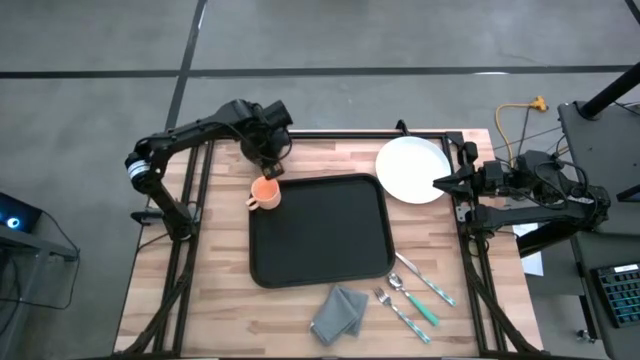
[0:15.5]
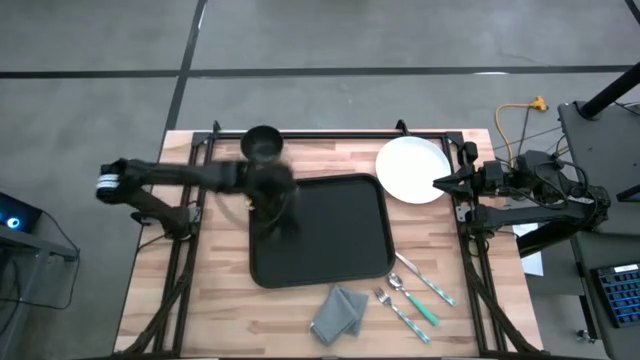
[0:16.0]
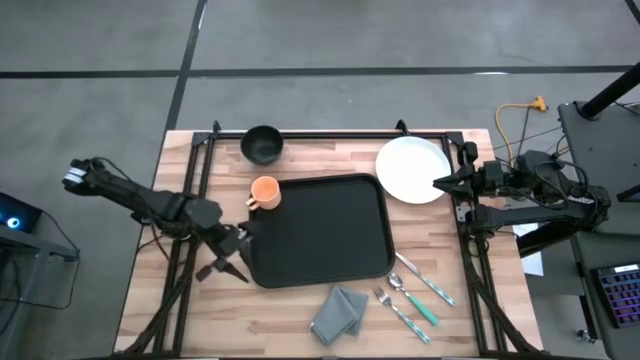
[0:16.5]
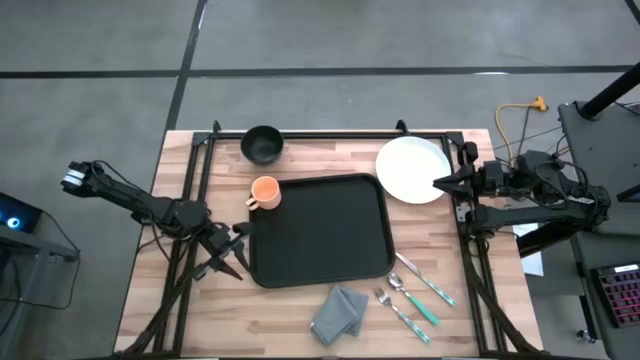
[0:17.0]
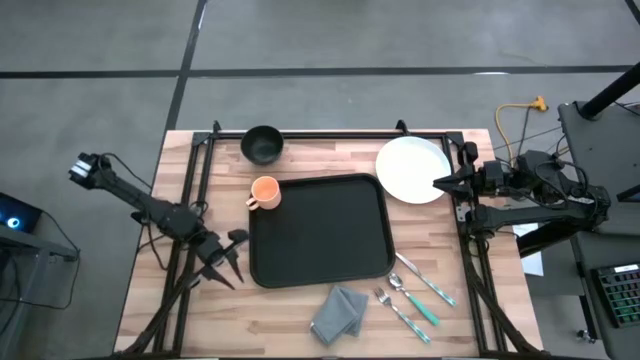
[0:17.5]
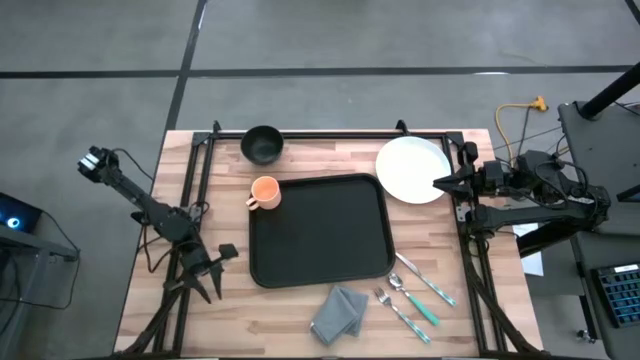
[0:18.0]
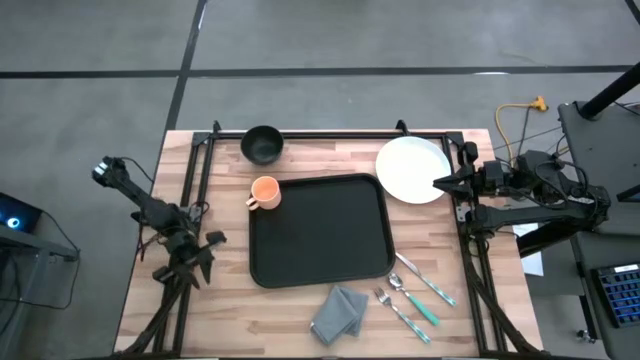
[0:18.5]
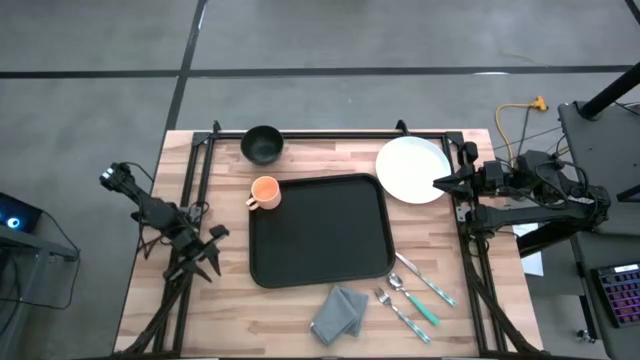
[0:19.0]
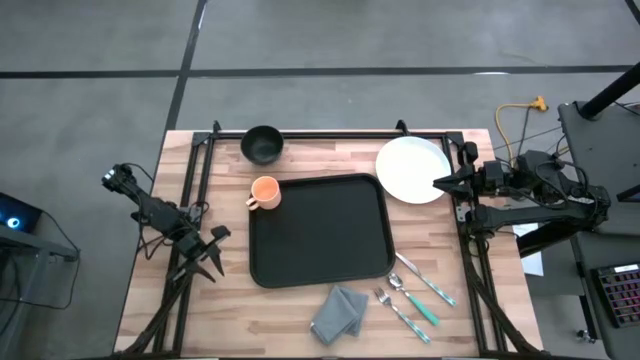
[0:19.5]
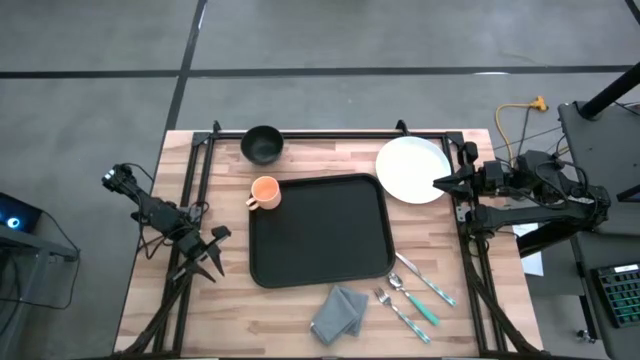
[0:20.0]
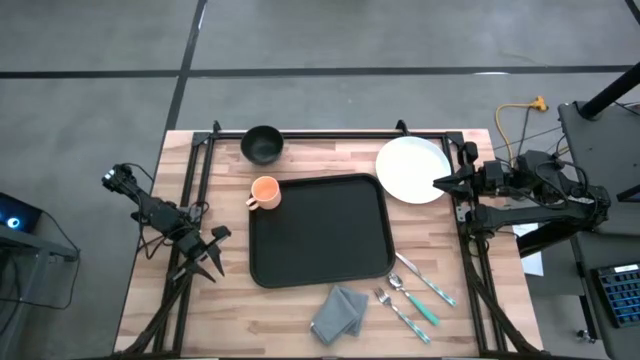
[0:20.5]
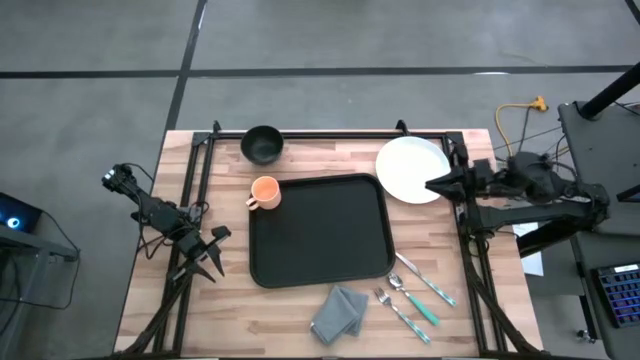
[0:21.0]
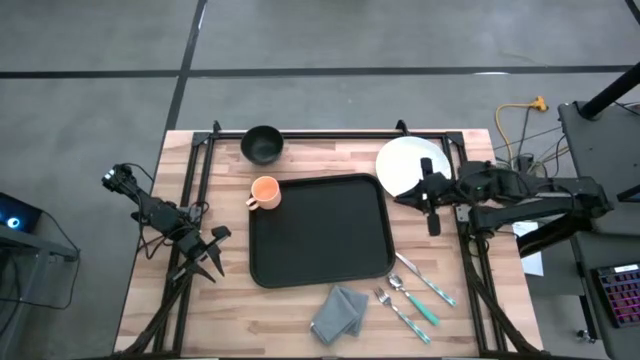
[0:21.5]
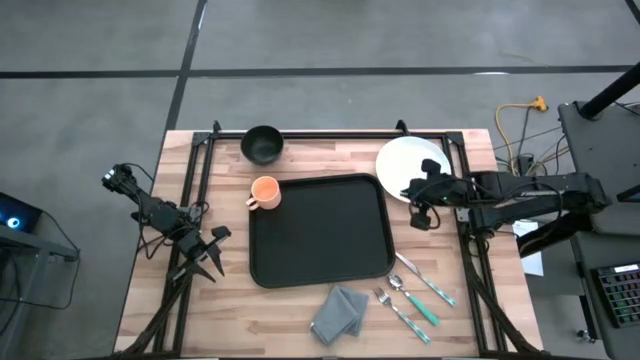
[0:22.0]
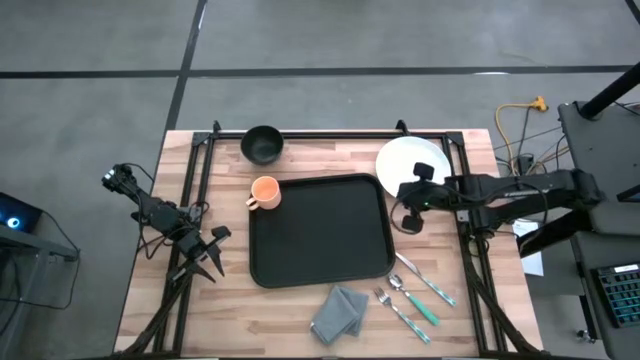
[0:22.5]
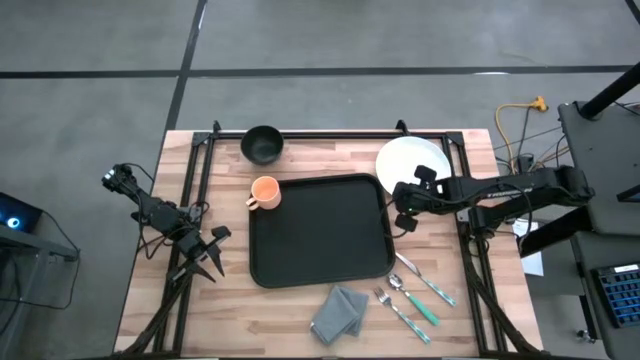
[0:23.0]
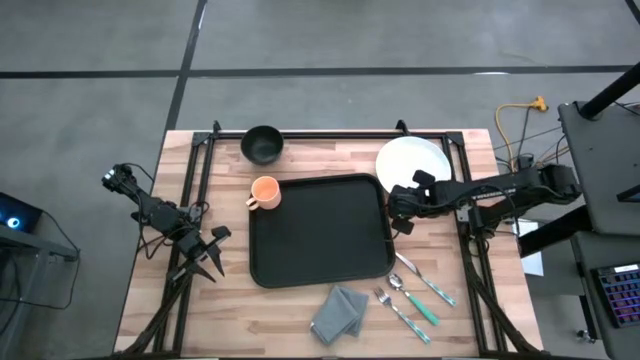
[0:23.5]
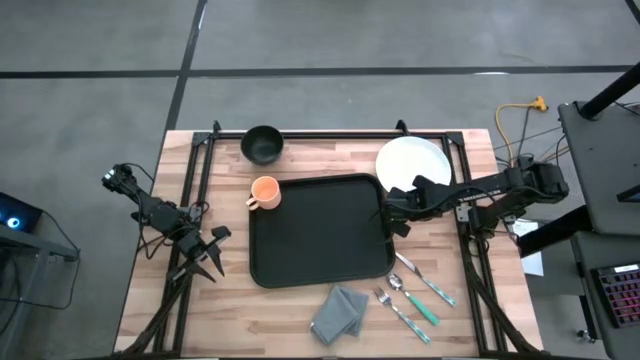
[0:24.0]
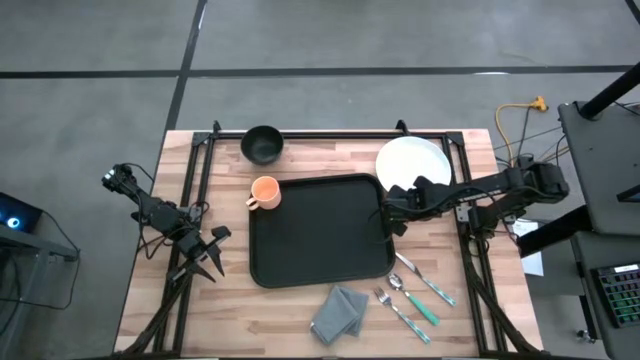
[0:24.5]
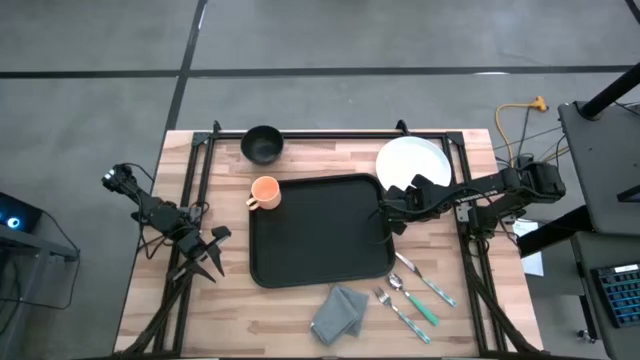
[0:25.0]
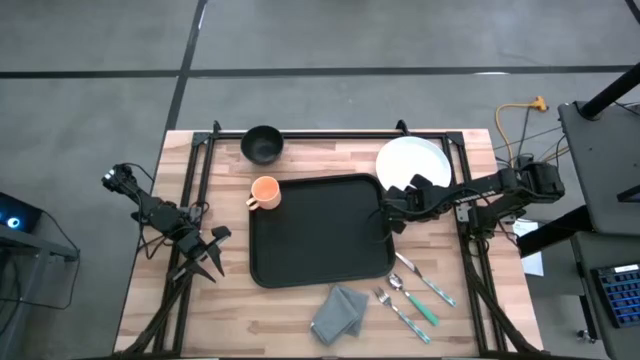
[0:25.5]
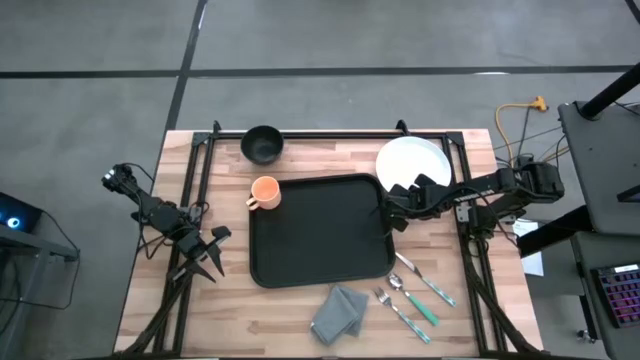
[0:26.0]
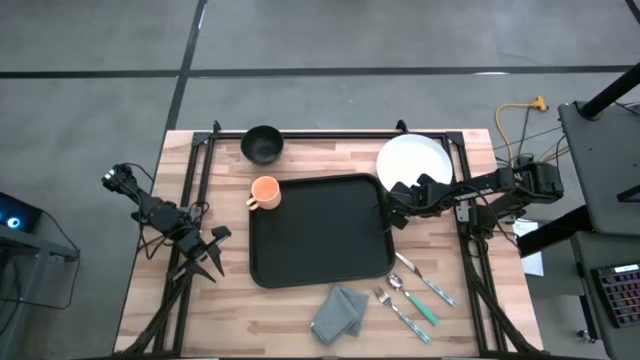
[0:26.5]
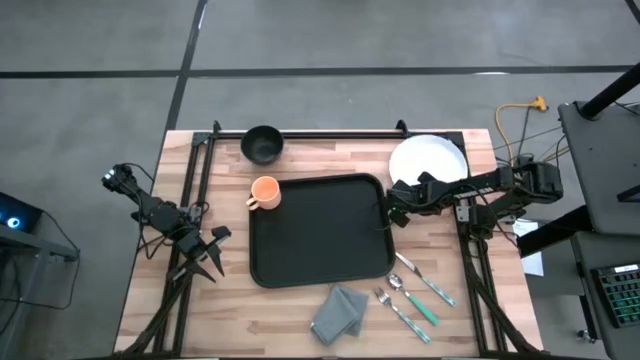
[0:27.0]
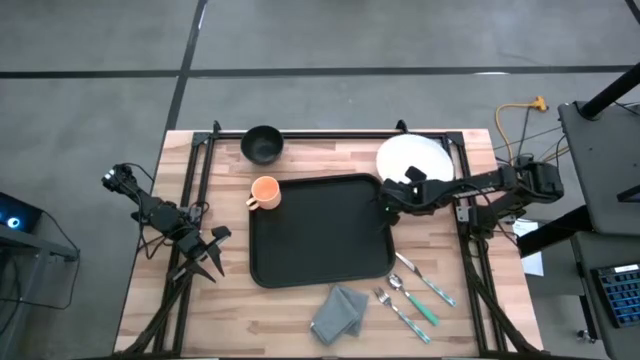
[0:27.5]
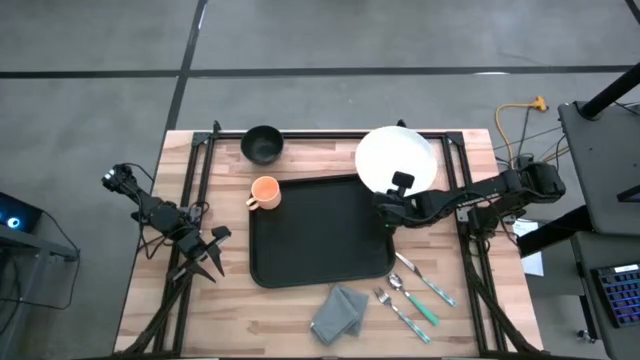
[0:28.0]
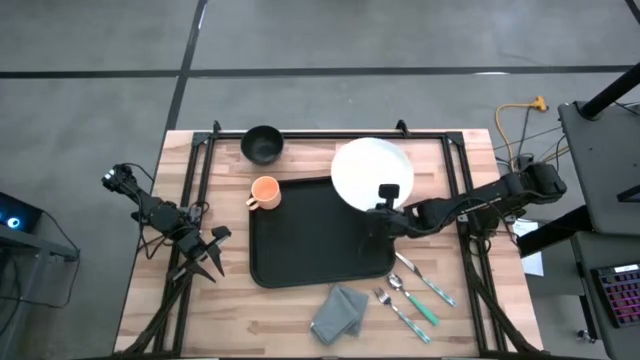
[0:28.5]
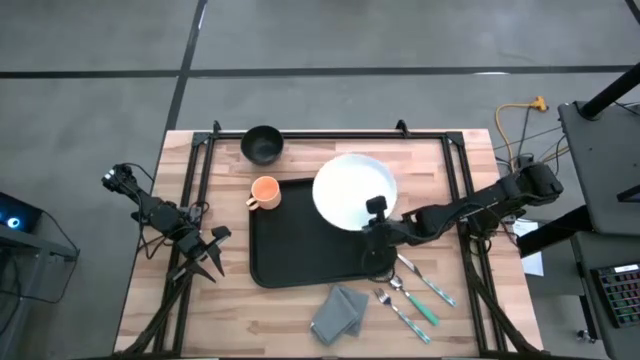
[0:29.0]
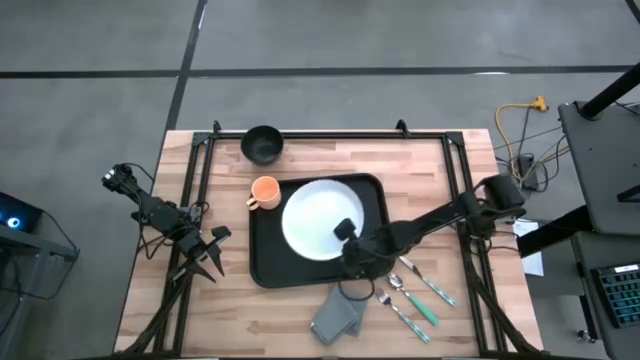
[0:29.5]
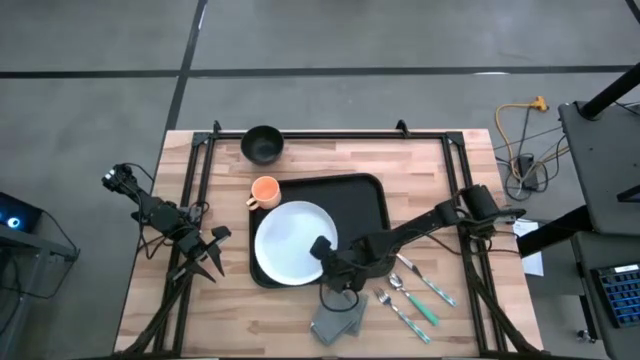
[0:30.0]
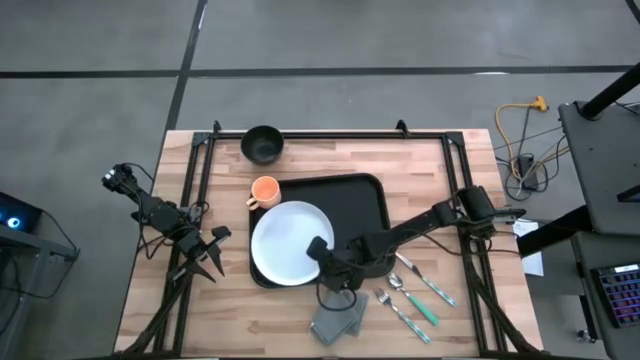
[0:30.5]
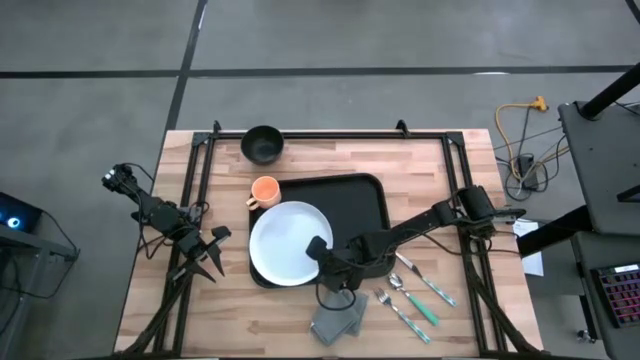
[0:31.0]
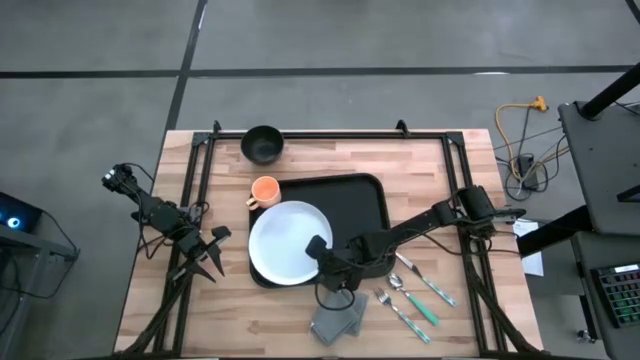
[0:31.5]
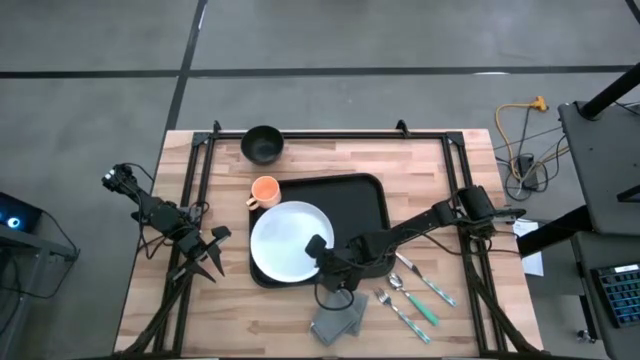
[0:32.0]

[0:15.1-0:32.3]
Task: Set up tray
Put the white plate on the black serving tray to the bottom left of the orange mug

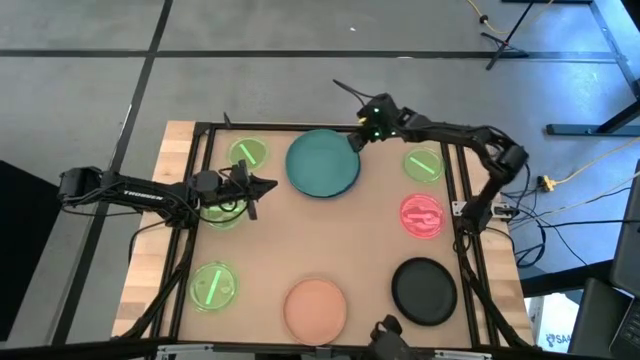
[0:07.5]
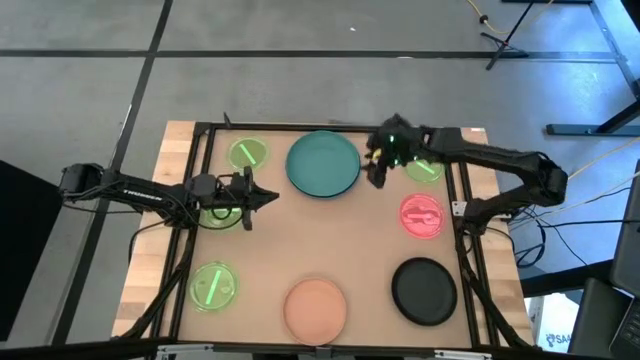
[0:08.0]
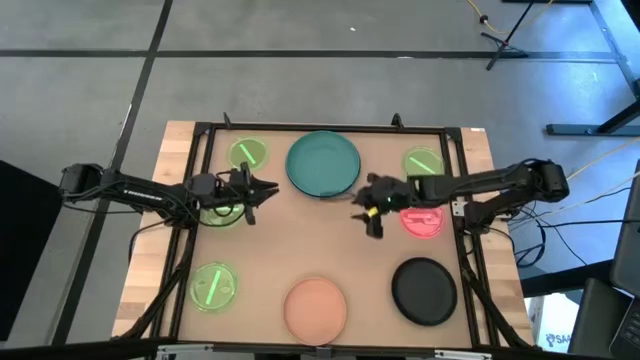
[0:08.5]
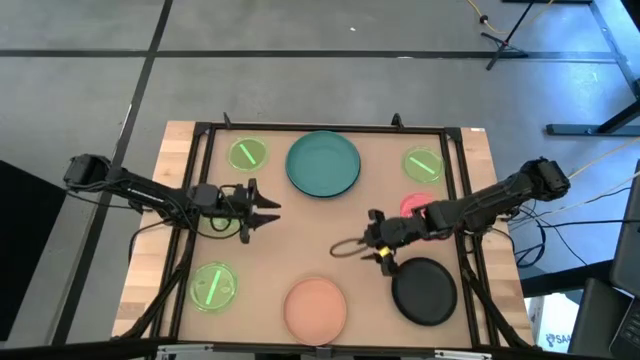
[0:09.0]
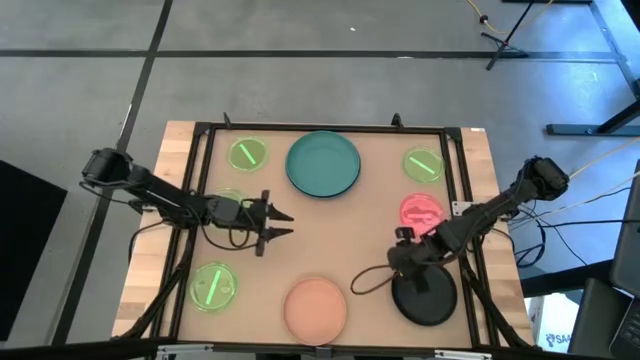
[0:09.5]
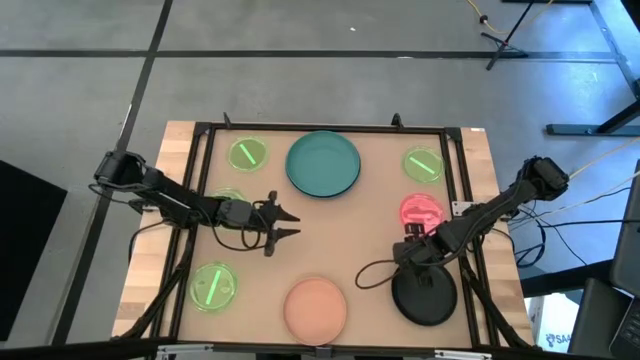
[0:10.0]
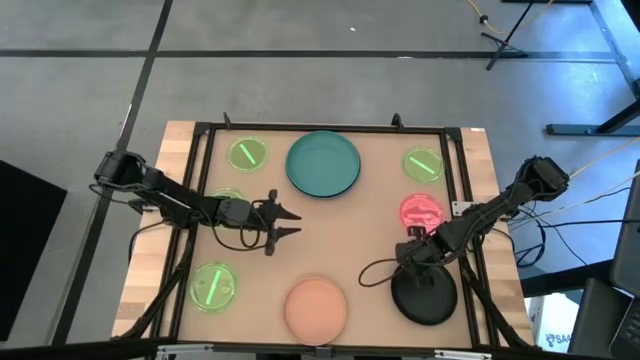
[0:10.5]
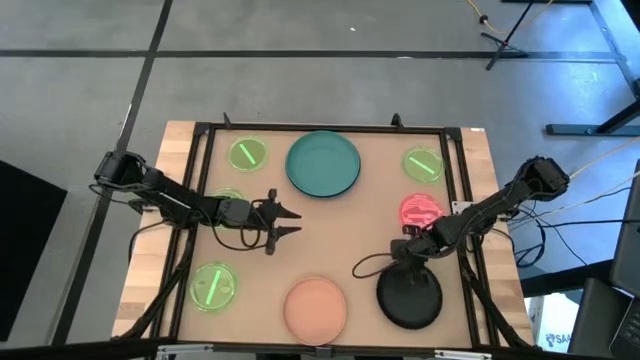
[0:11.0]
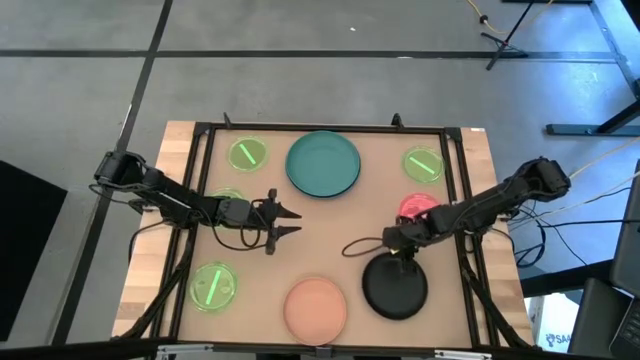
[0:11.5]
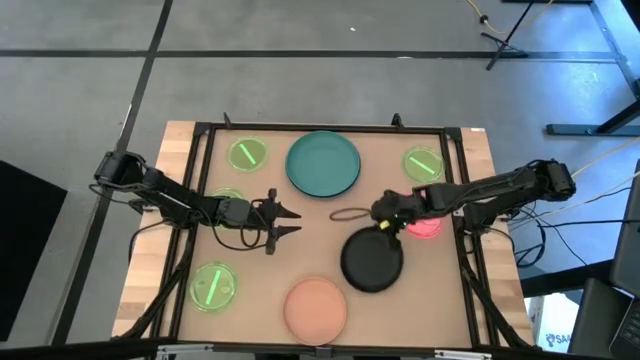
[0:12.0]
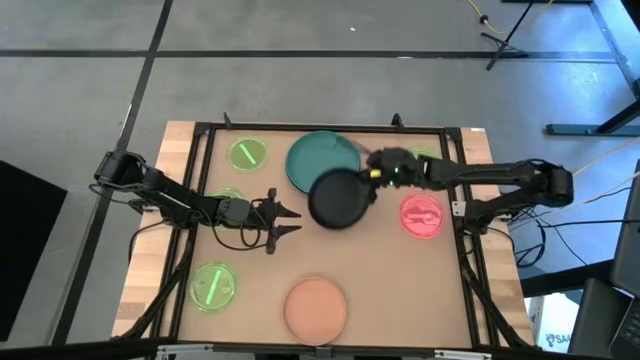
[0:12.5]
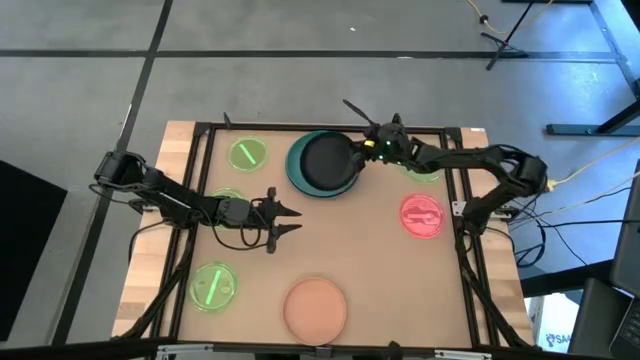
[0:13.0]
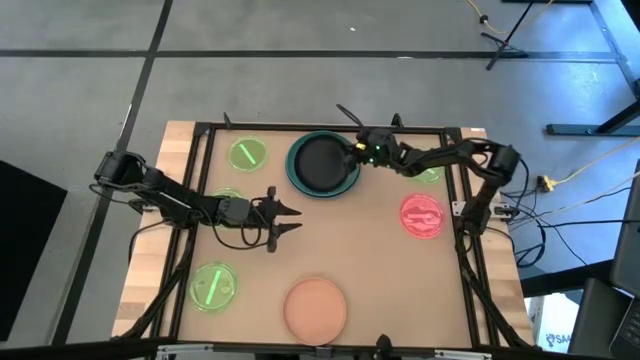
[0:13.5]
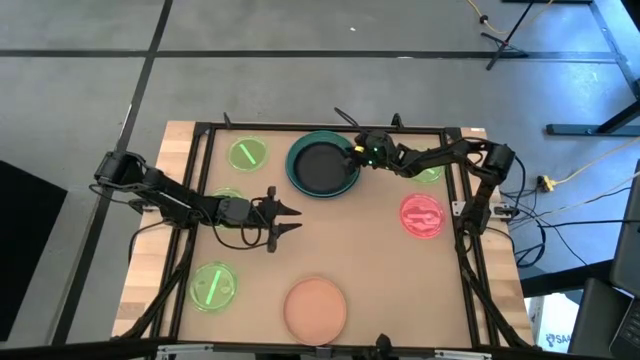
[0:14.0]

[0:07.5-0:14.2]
Task: Stack plastic plates
Stack the black plate on top of the green plate
